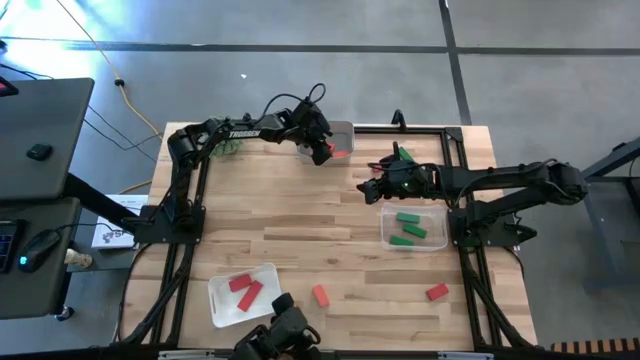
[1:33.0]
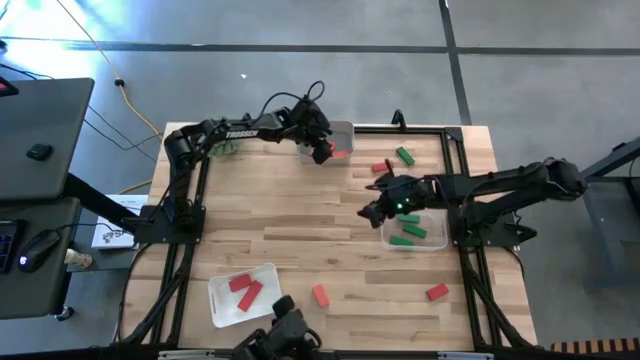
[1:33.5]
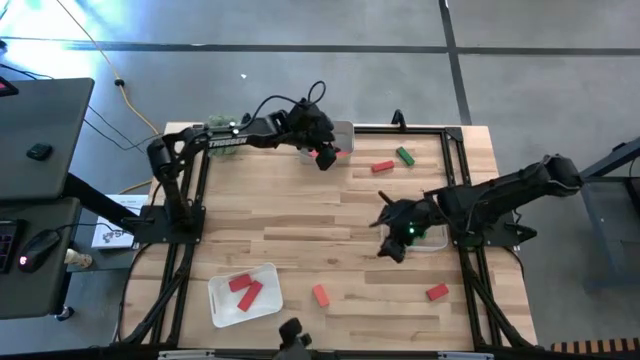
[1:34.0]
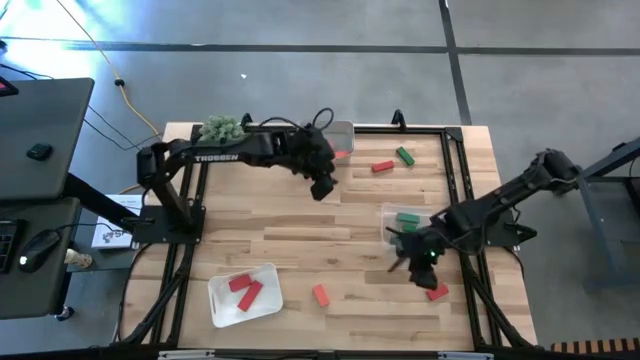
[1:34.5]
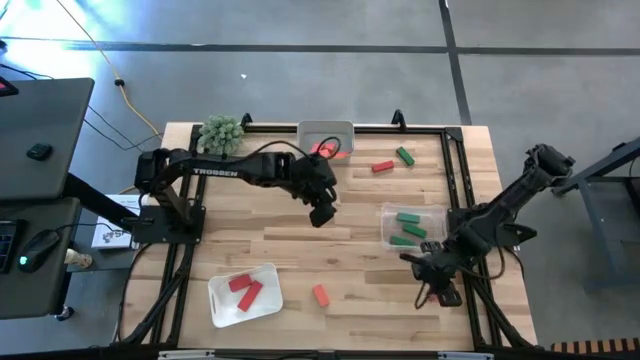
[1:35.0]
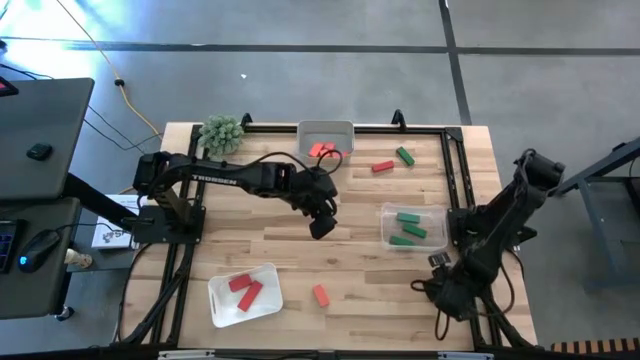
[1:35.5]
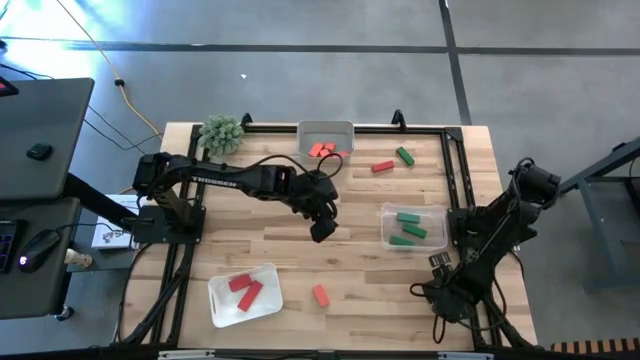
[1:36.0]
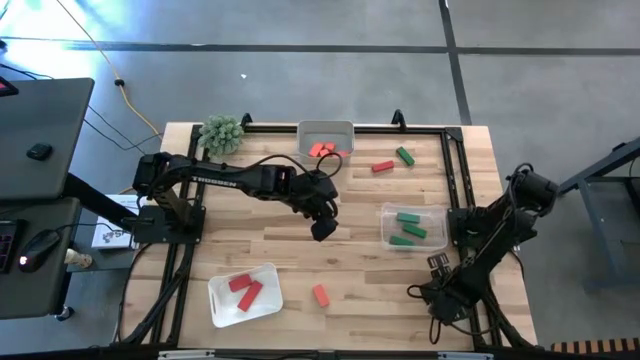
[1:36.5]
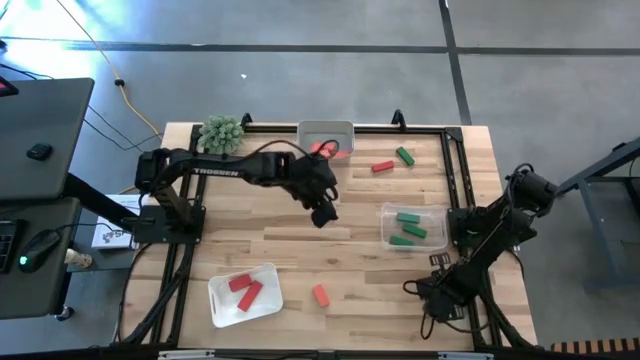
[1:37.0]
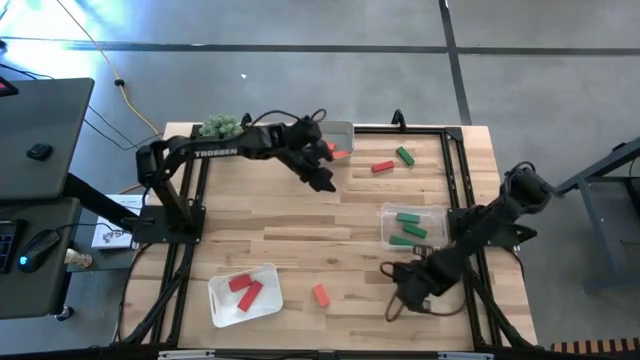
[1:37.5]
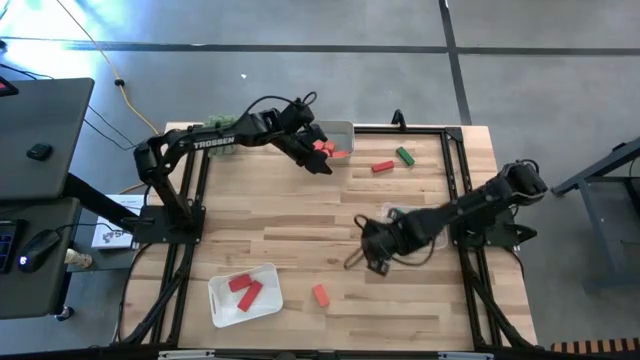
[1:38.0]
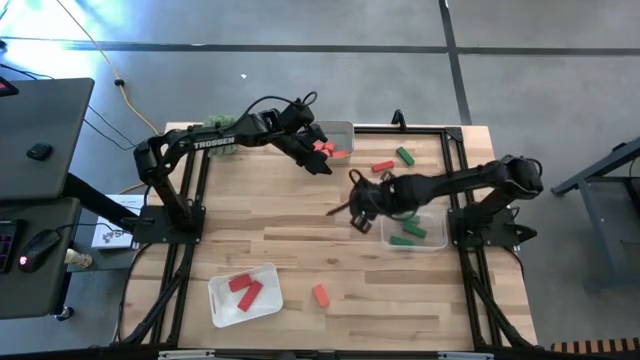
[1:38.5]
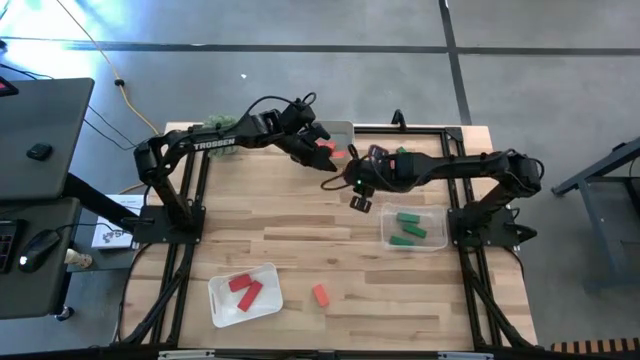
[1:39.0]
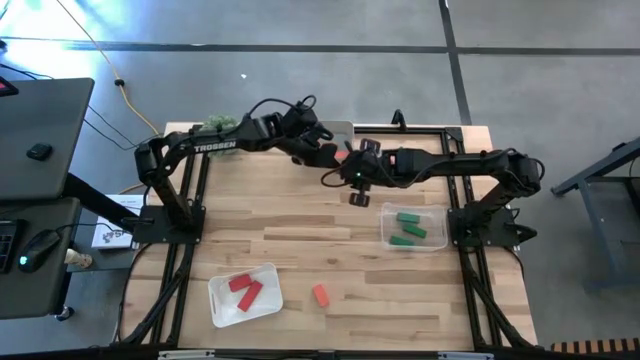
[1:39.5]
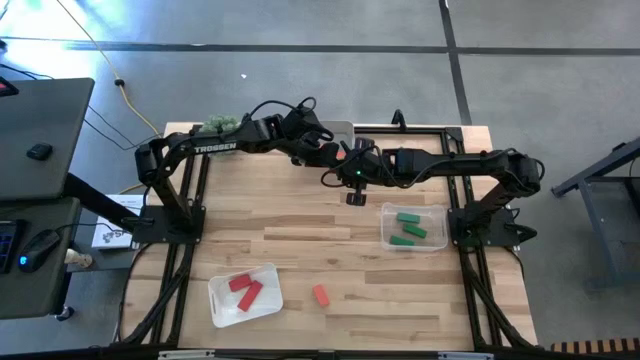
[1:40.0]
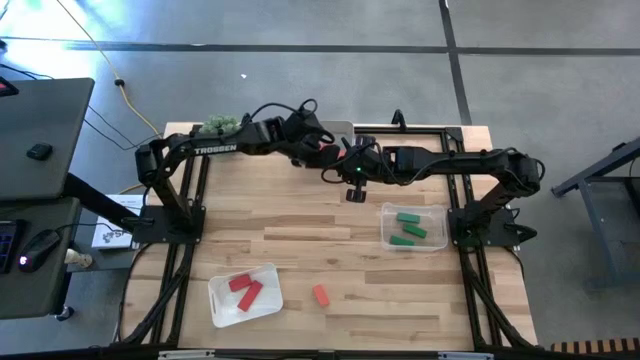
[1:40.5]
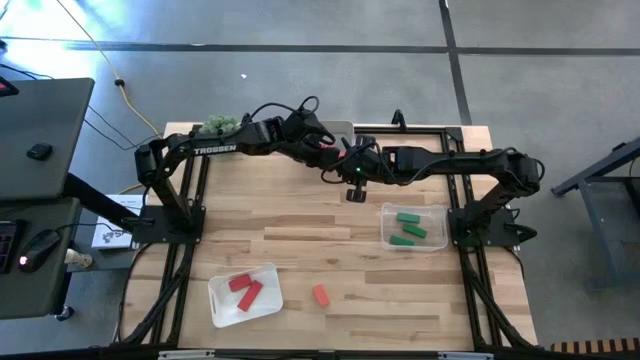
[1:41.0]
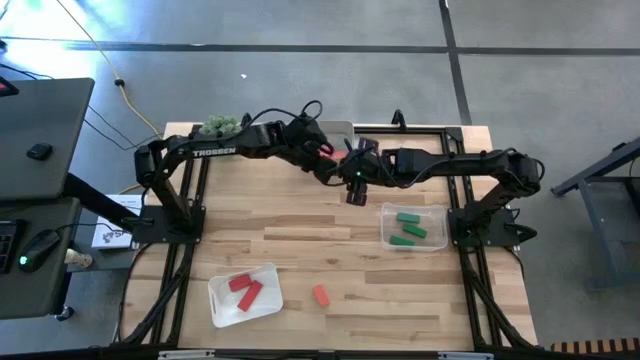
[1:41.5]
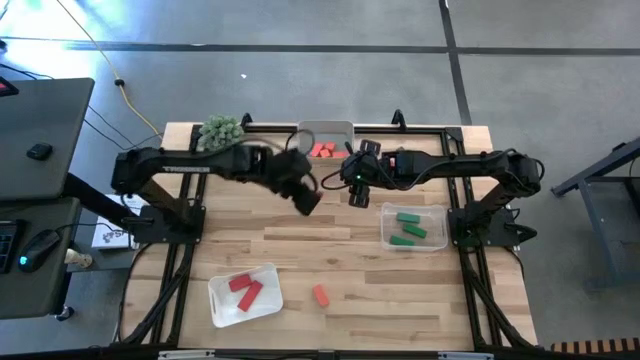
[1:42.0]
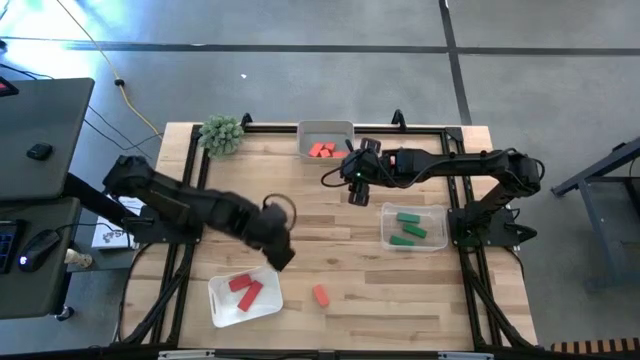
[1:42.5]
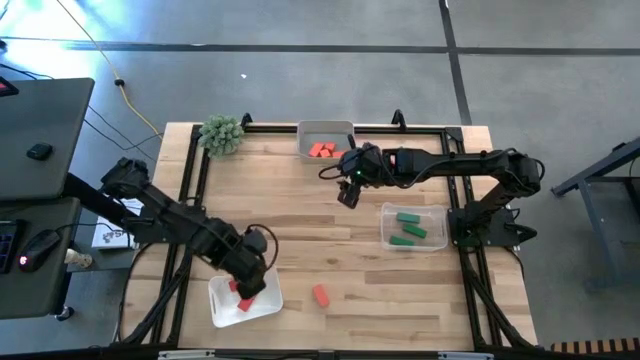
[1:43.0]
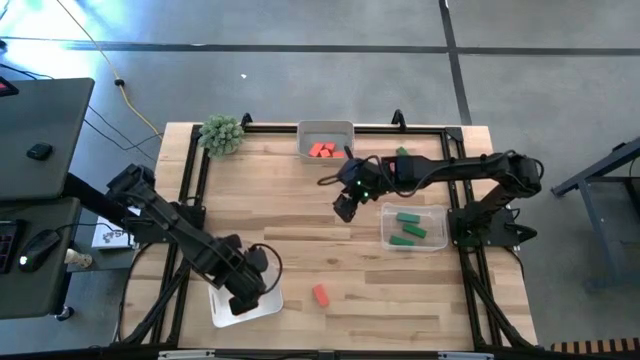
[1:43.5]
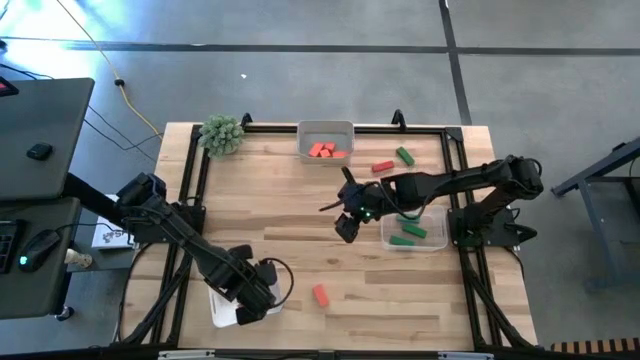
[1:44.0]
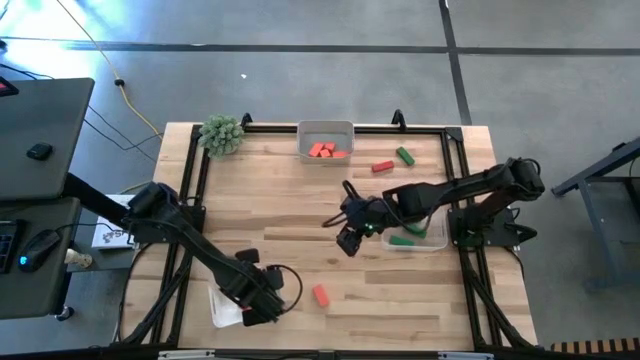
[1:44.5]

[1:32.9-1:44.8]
Task: Sort & place blocks by color
Put the red wooden block into the white bin

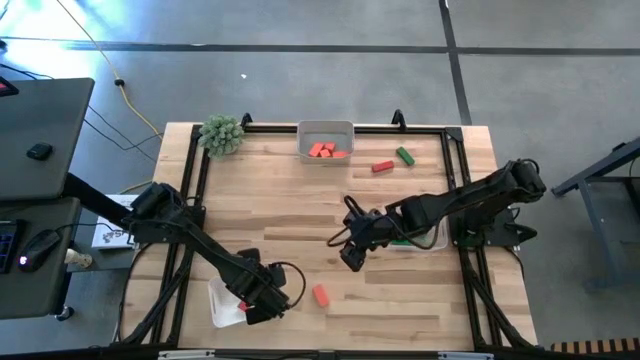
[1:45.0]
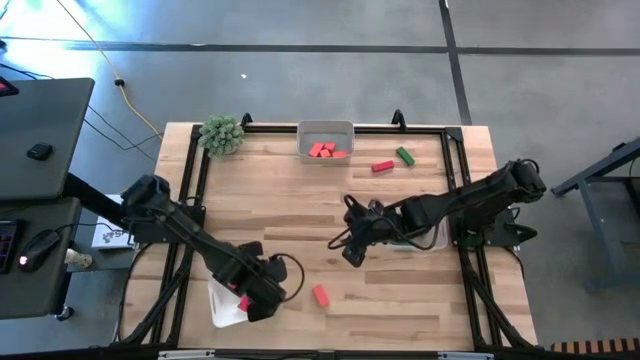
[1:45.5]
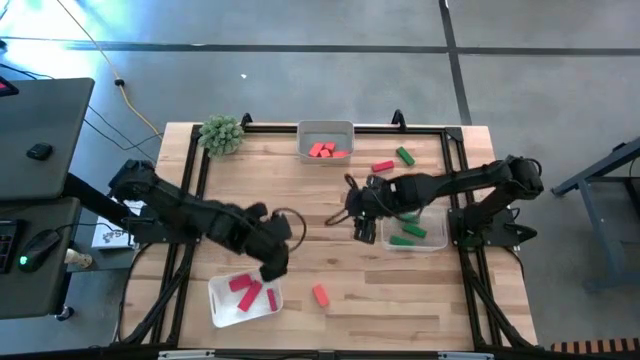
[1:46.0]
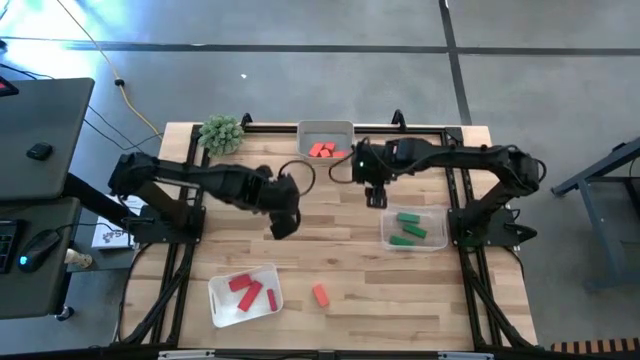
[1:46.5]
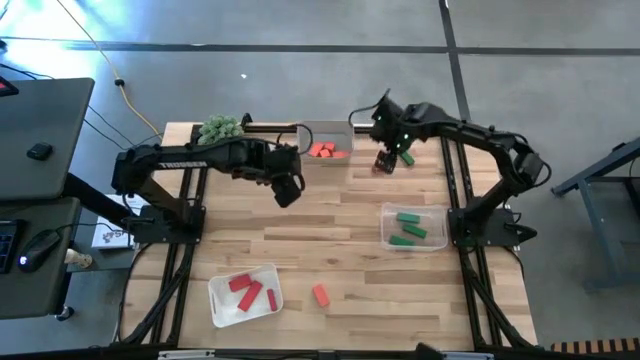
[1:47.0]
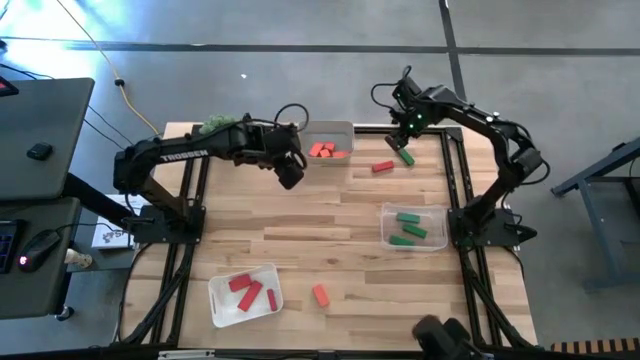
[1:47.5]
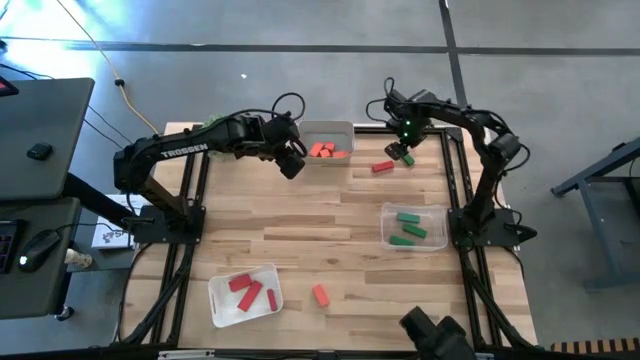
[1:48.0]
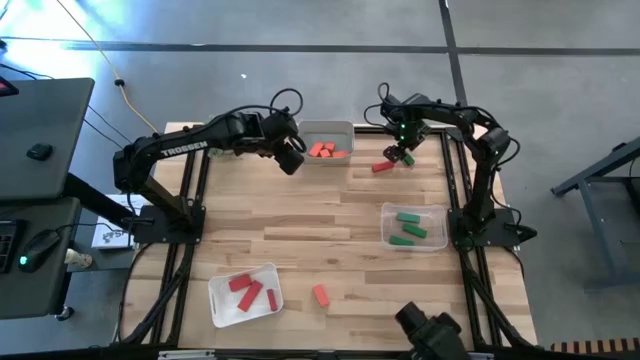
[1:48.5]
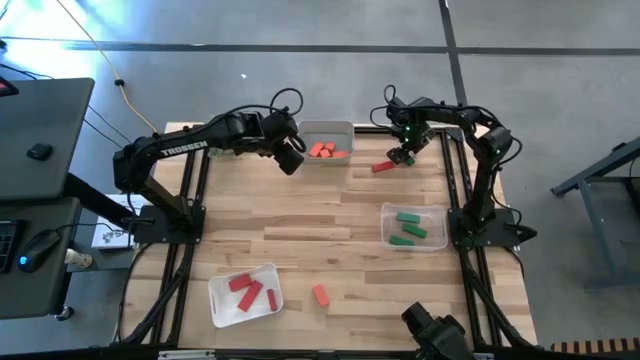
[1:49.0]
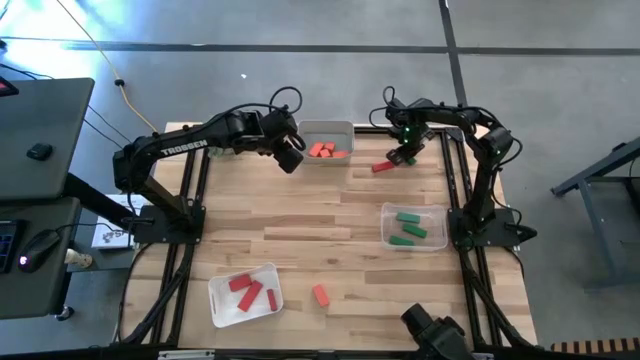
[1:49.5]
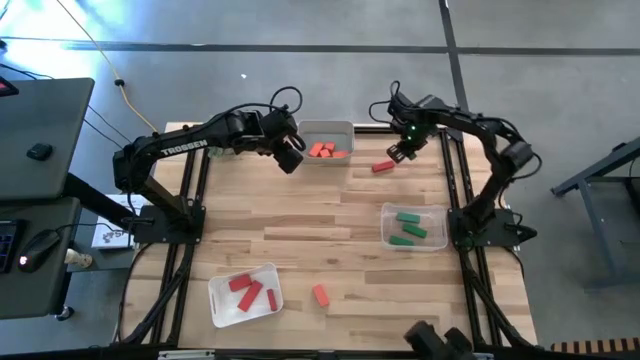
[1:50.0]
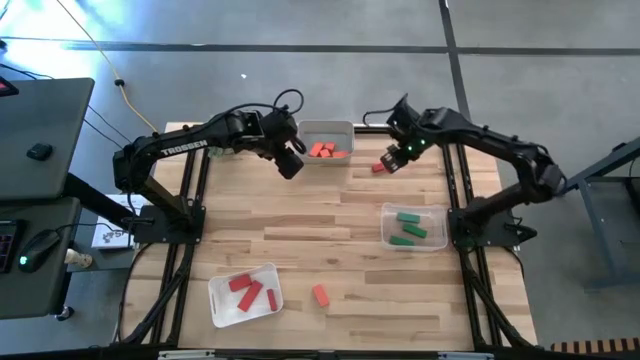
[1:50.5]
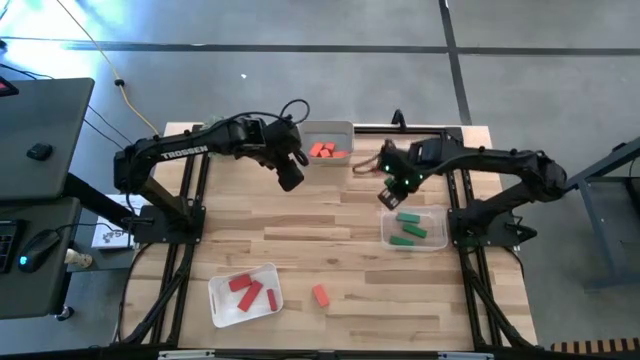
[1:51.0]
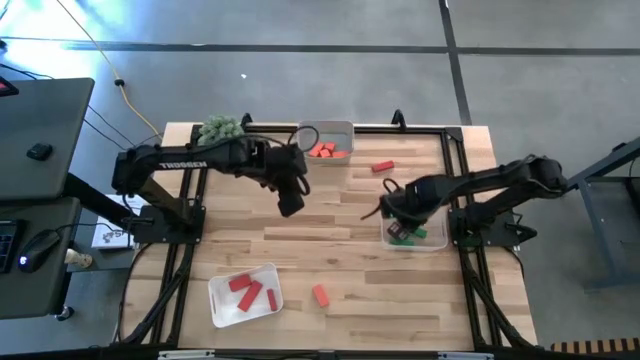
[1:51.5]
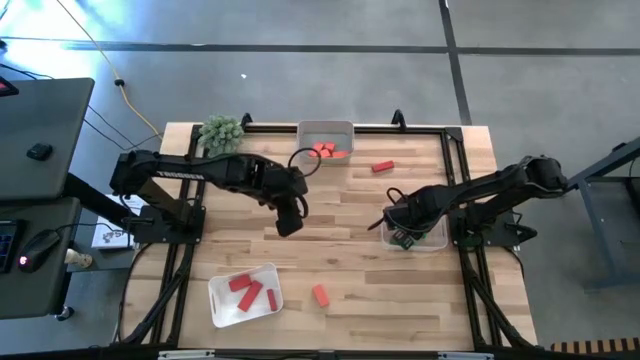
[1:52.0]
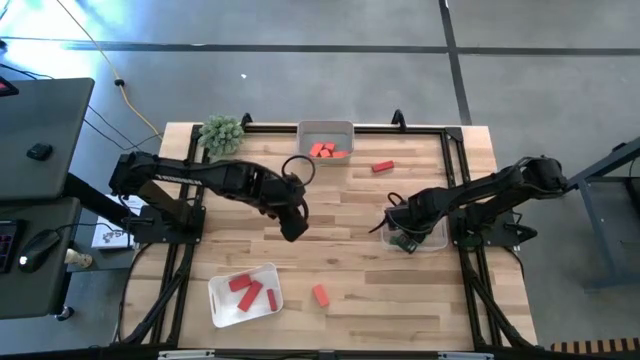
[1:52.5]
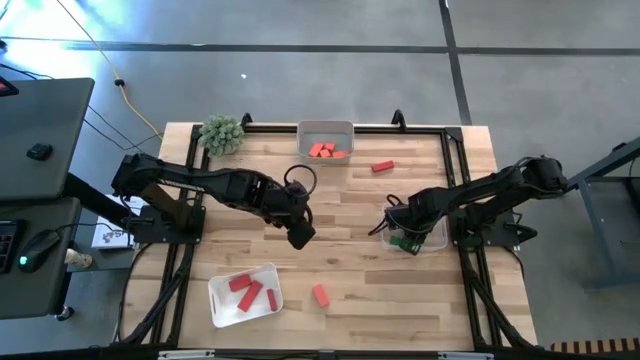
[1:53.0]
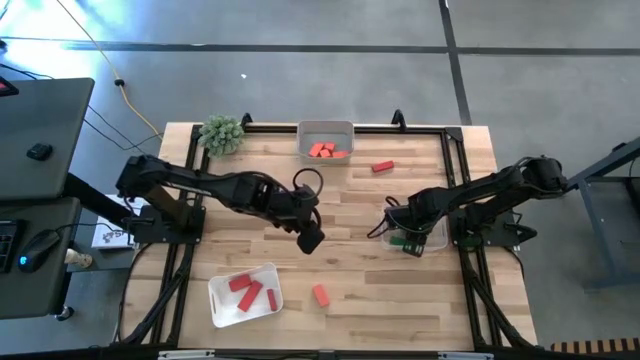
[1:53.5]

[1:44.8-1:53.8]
Put the green wooden block into the transparent bin
